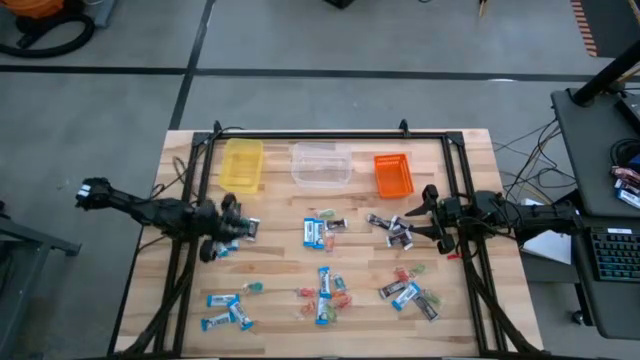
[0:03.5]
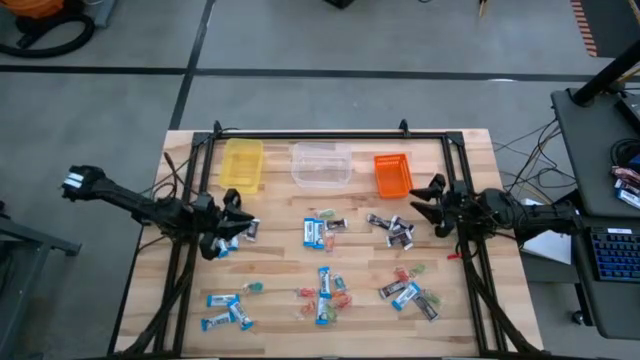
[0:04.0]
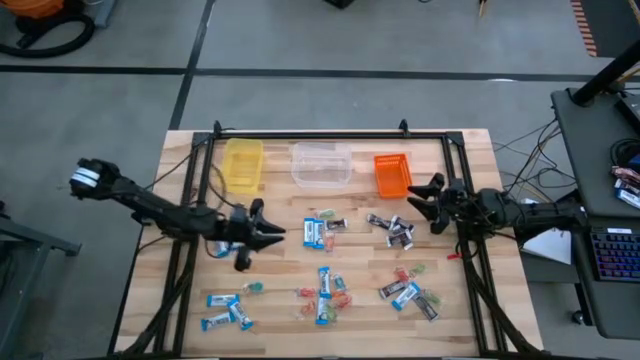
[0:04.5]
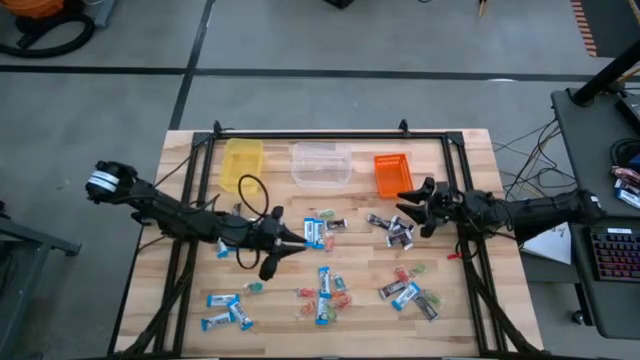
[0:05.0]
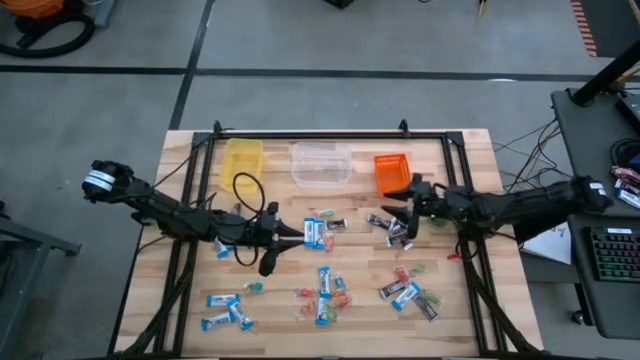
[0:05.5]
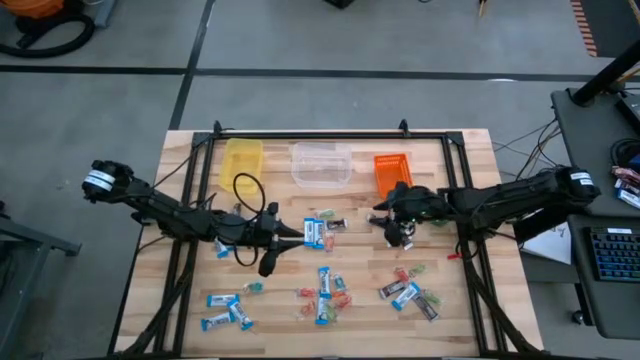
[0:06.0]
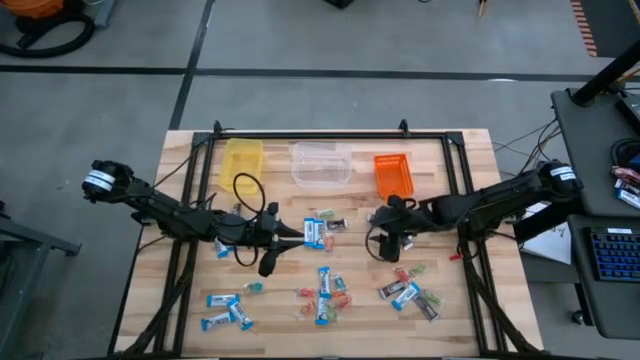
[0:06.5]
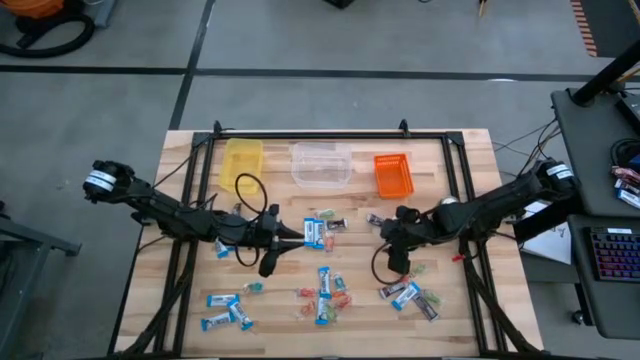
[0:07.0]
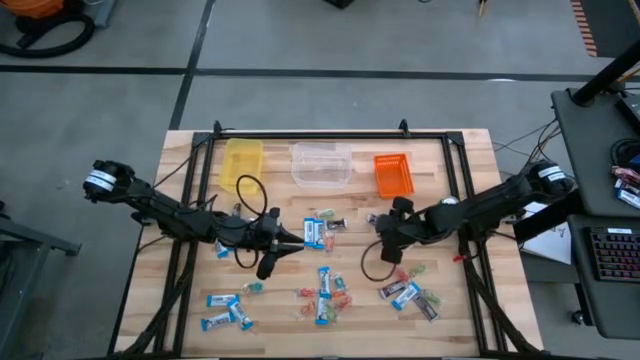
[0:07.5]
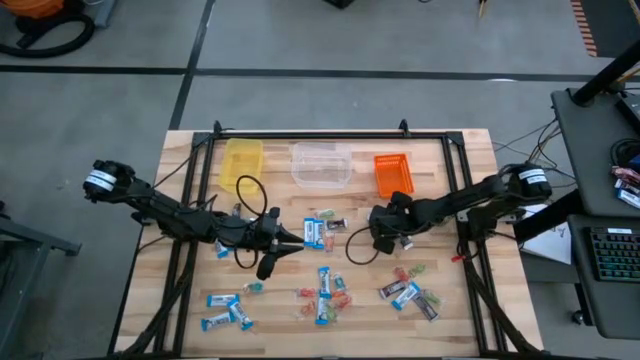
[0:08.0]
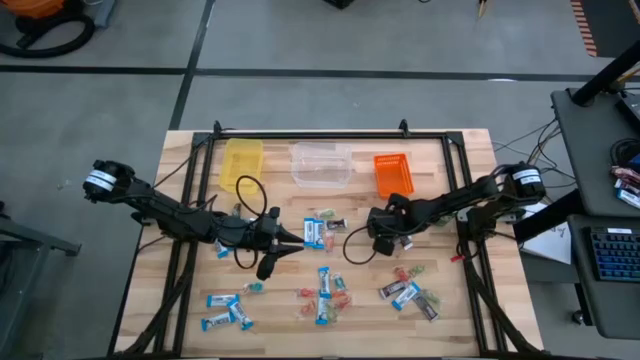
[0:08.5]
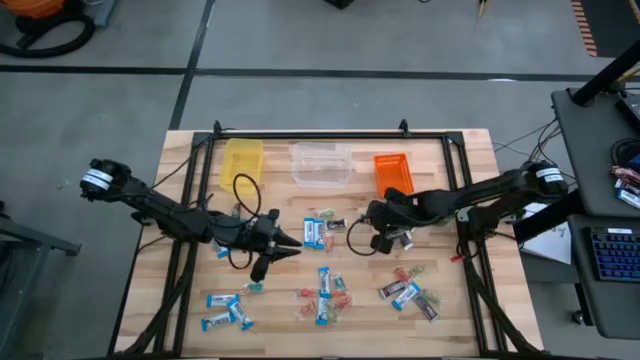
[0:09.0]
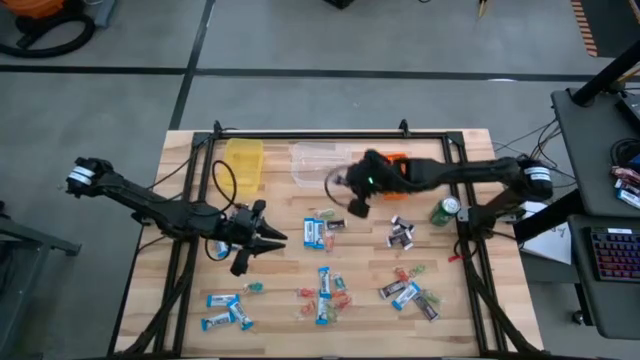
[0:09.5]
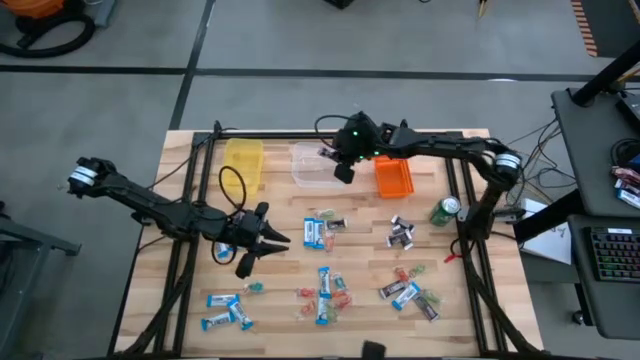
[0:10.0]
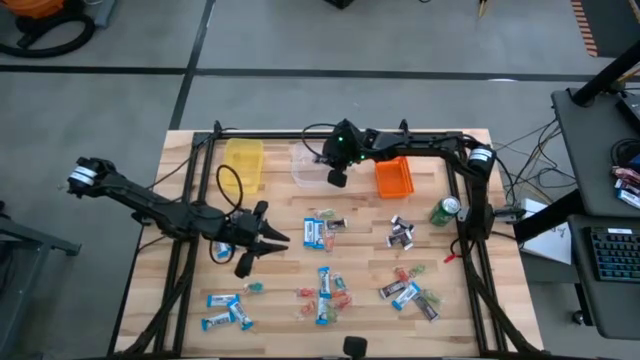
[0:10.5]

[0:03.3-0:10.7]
Task: Organize candy in baskets
Put the brown chocolate bar into the transparent bin

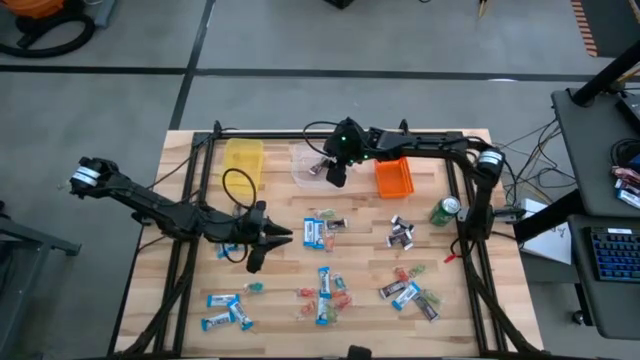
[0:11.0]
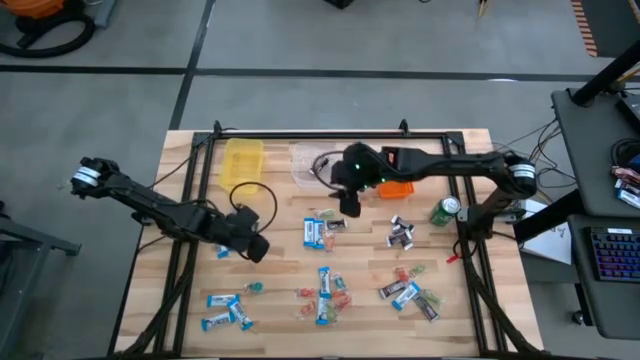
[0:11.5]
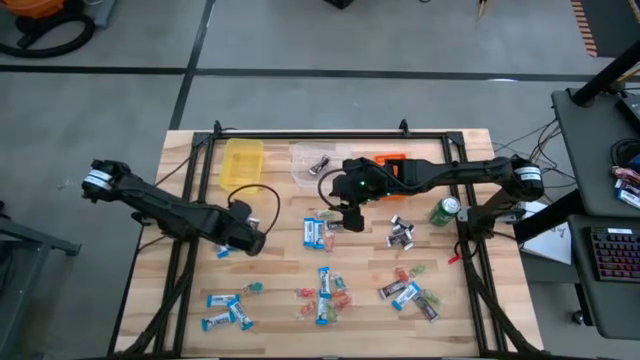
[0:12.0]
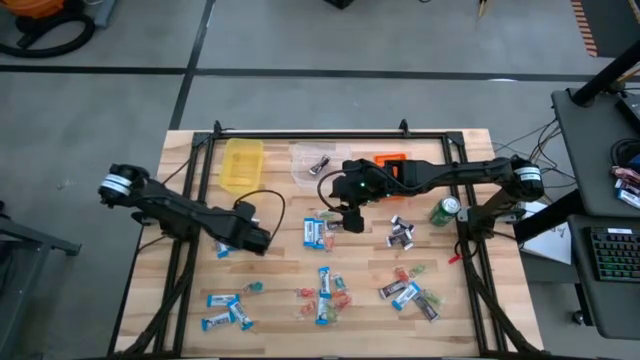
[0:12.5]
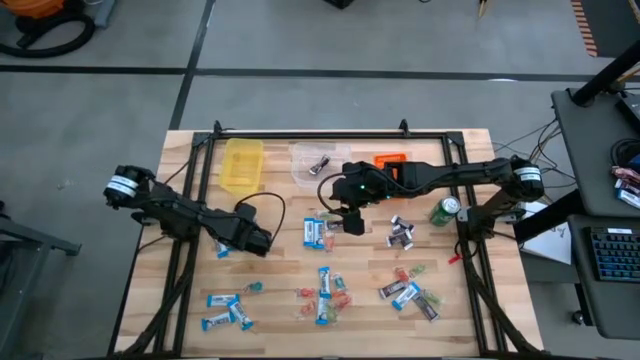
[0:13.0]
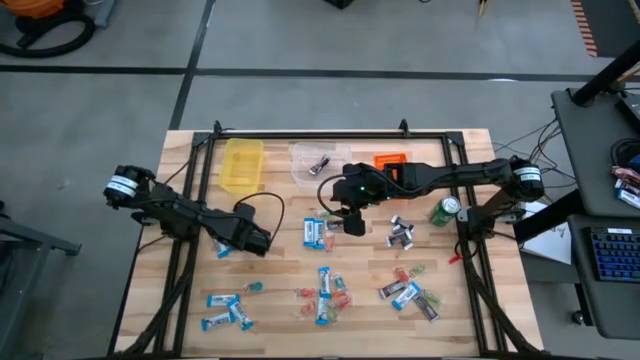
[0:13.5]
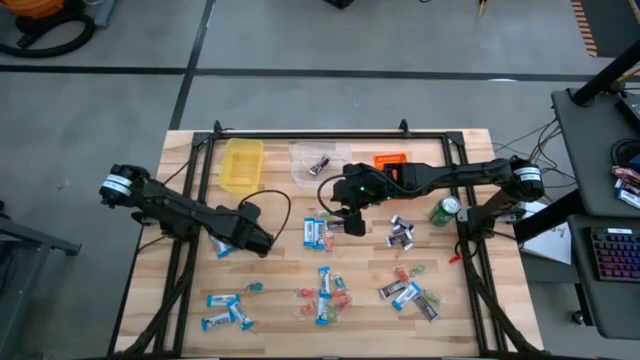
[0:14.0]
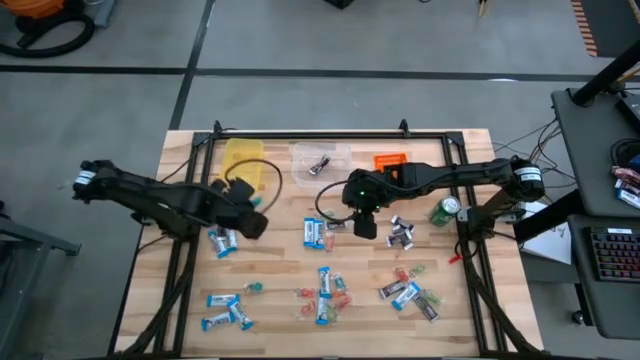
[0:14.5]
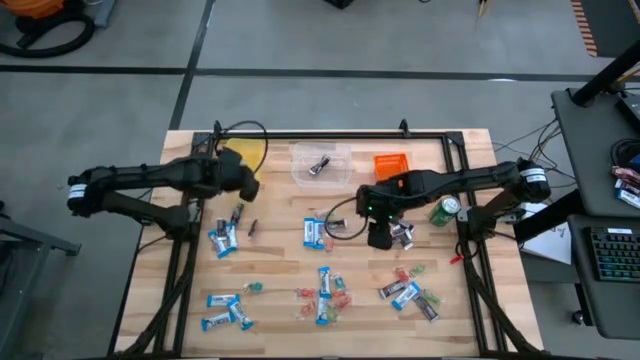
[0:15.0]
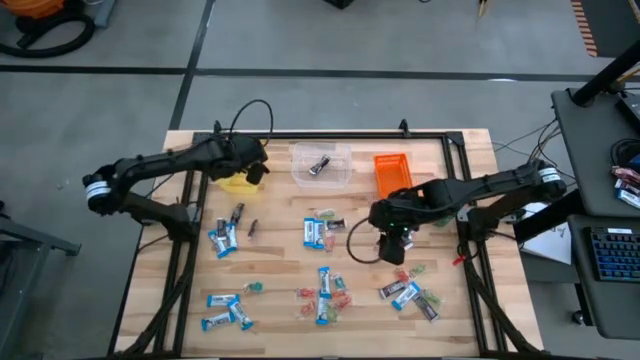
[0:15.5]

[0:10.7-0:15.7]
Put the blue gummy into the yellow bin

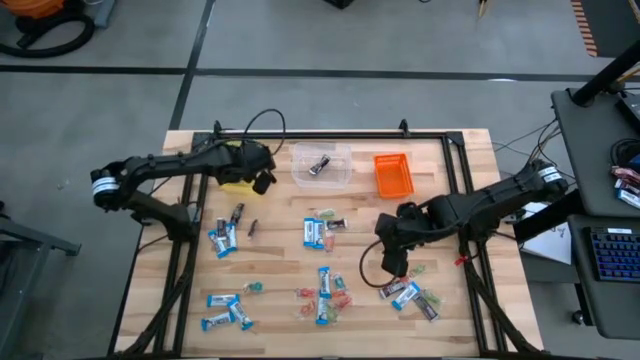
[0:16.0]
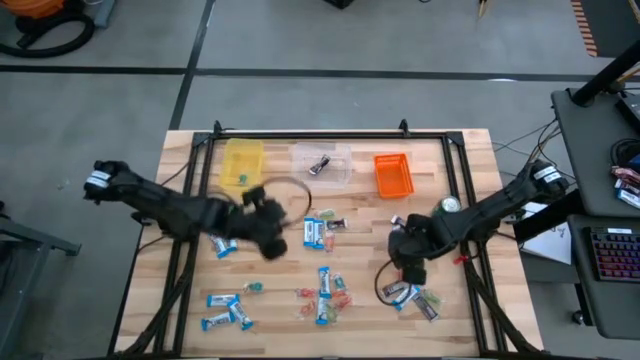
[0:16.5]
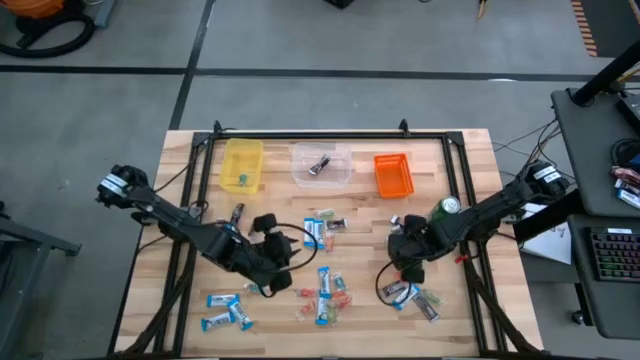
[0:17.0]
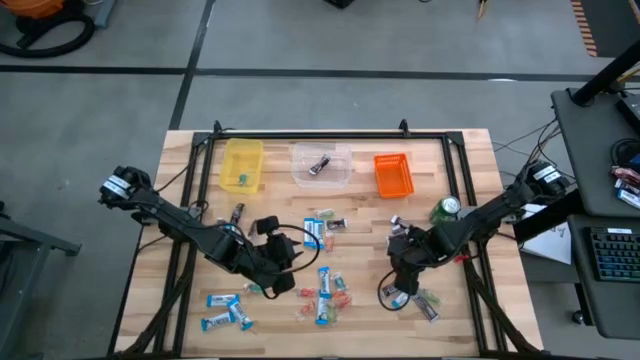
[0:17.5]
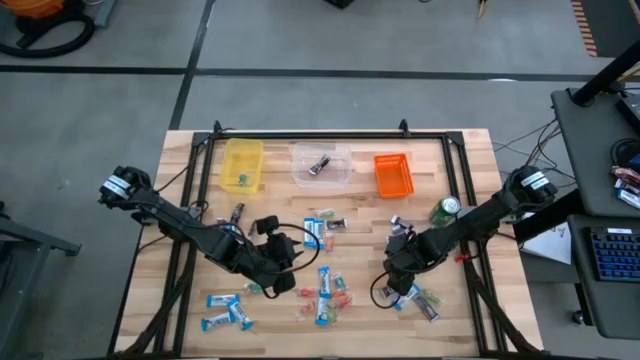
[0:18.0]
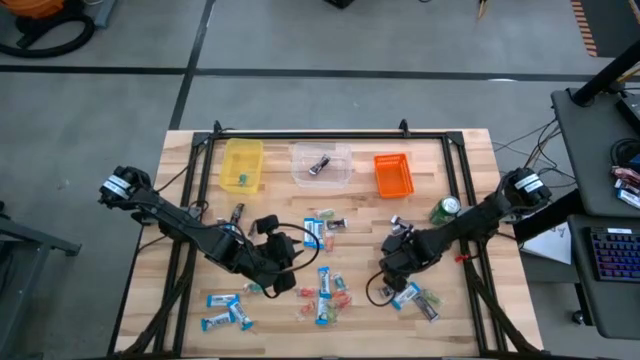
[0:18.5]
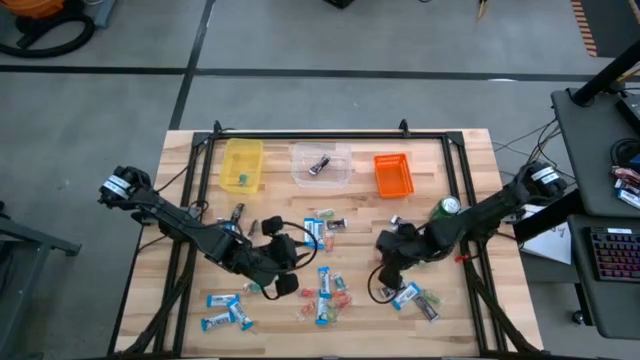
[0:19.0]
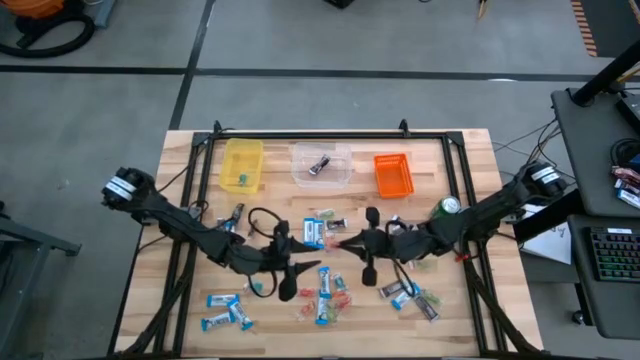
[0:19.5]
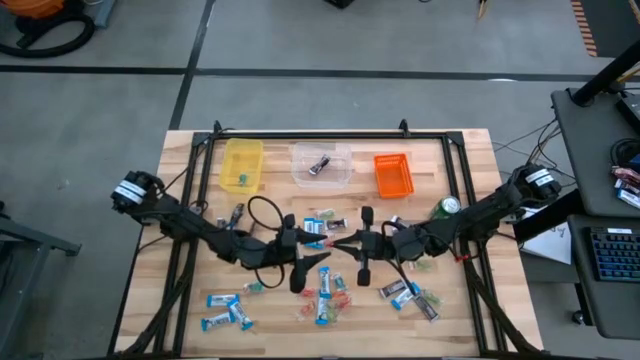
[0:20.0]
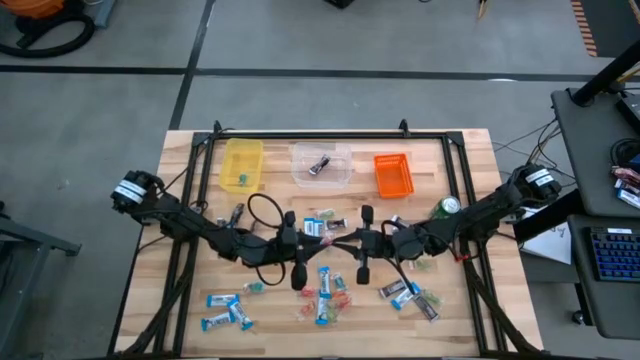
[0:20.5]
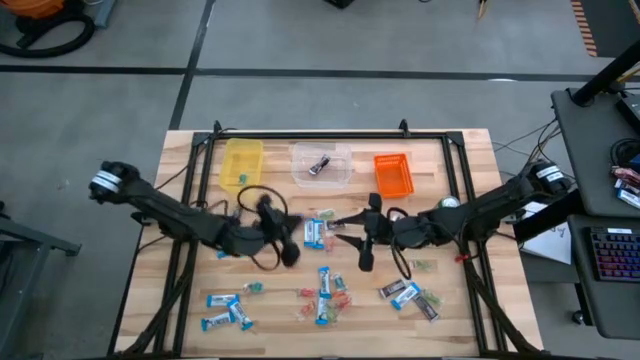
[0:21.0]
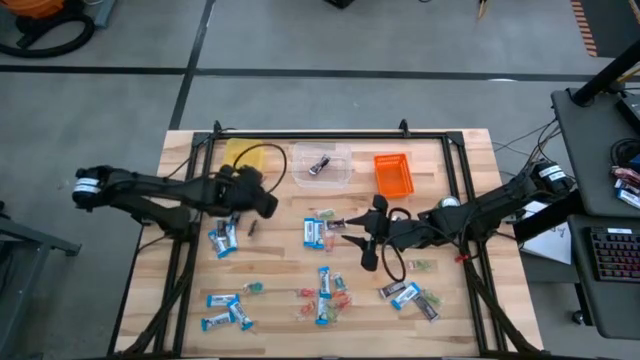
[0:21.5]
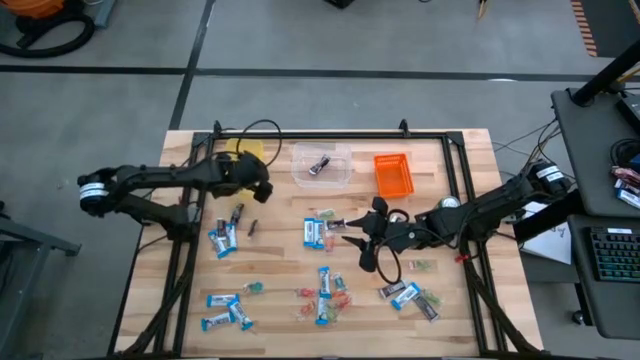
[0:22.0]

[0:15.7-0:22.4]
Put the red gummy into the yellow bin

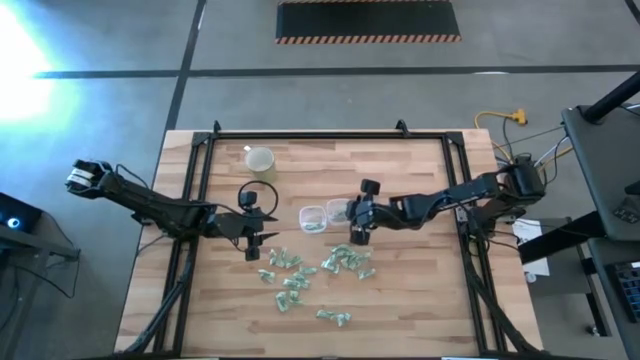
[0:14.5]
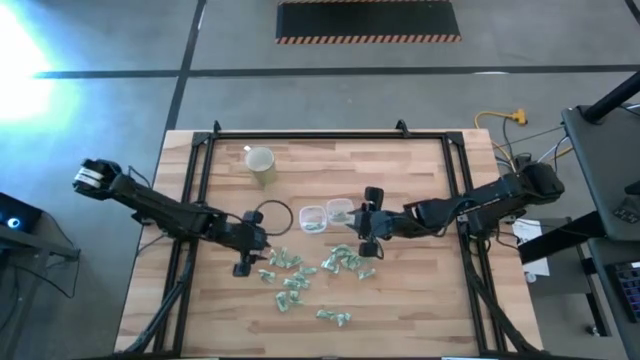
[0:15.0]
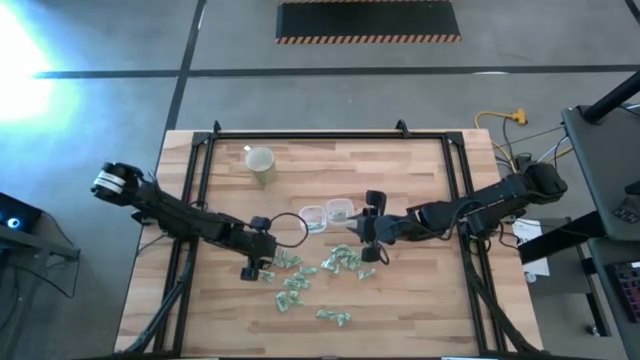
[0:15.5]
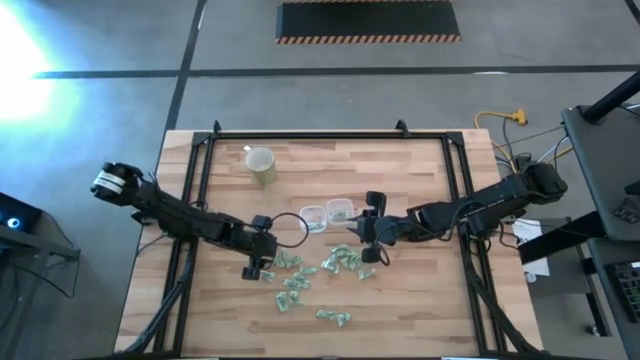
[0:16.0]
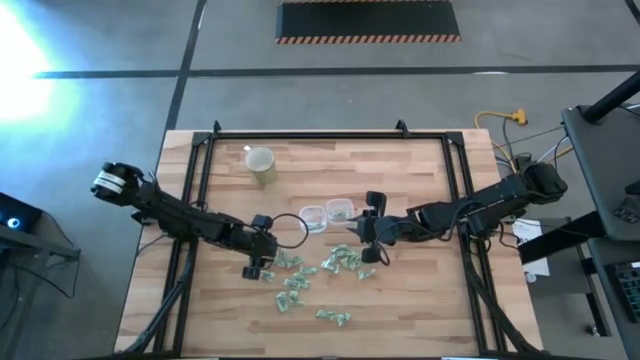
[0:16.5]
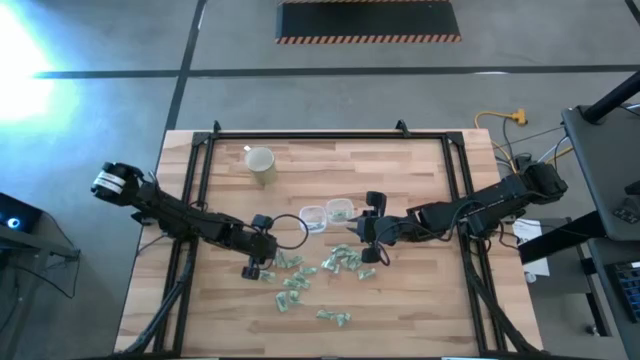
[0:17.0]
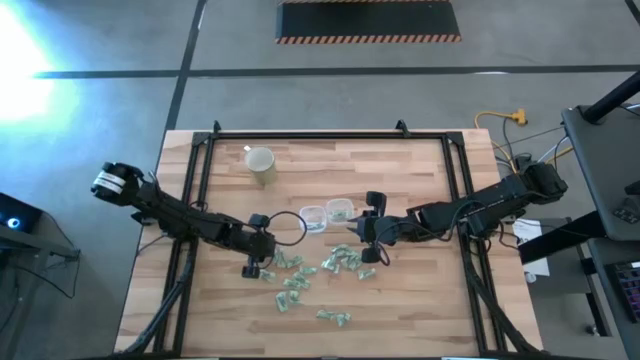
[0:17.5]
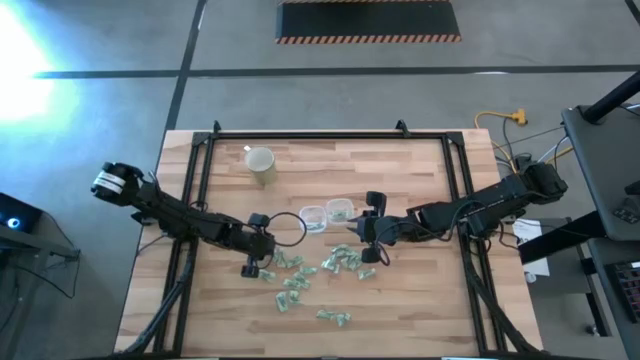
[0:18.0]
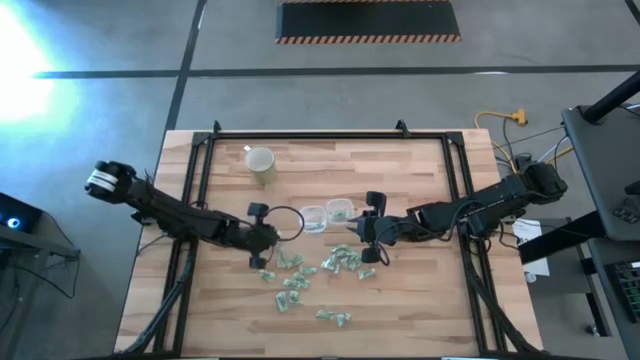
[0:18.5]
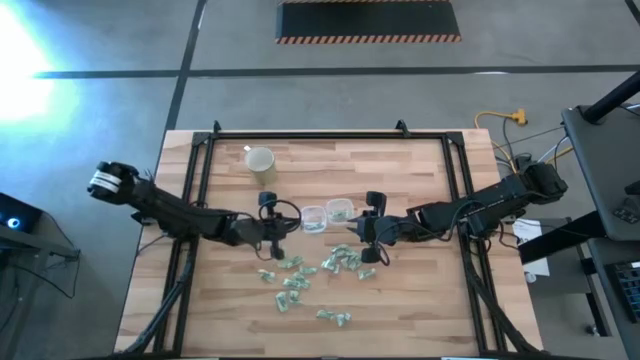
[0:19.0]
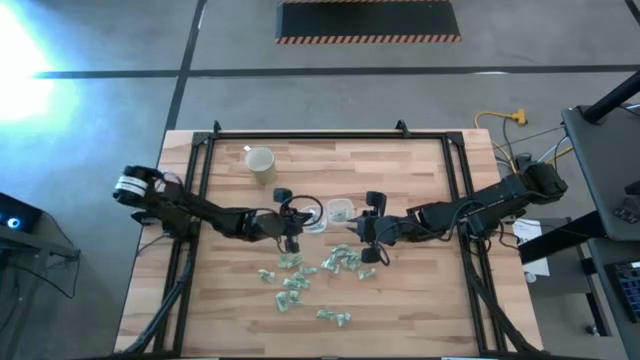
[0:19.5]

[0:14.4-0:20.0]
Task: Pick and place items into bin
Put the stevia packet into the left transparent bin
